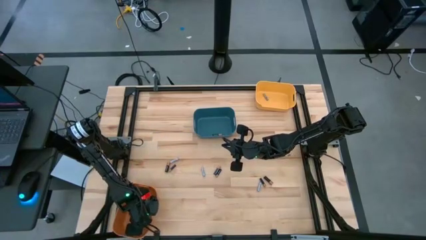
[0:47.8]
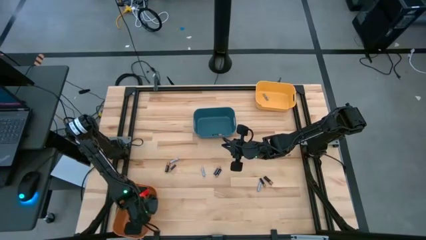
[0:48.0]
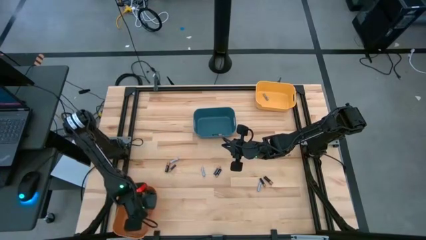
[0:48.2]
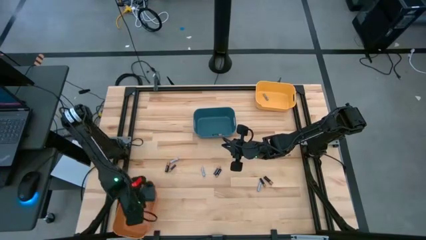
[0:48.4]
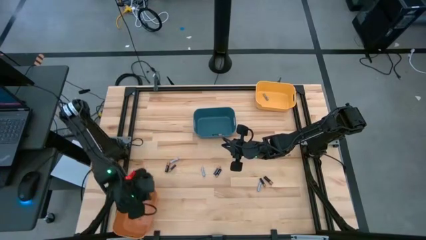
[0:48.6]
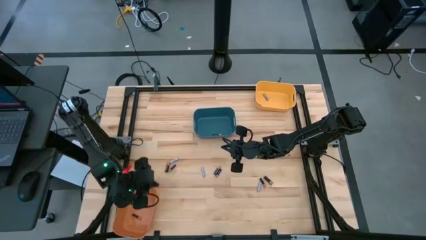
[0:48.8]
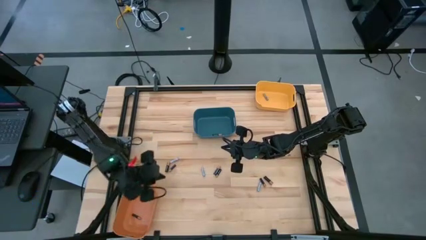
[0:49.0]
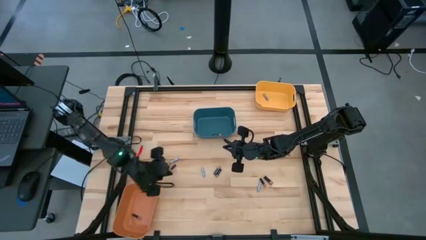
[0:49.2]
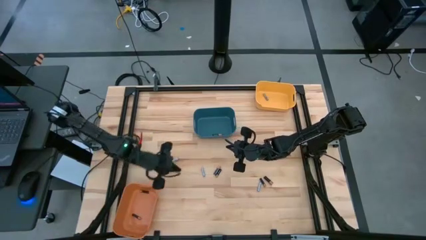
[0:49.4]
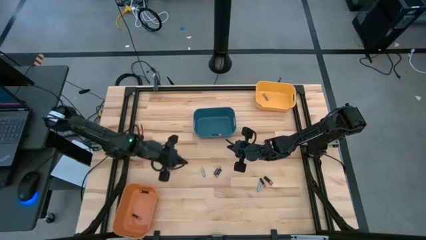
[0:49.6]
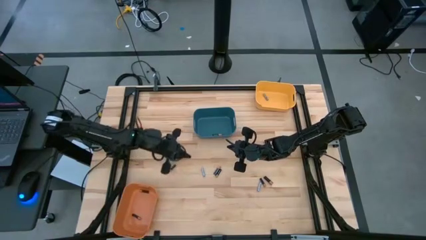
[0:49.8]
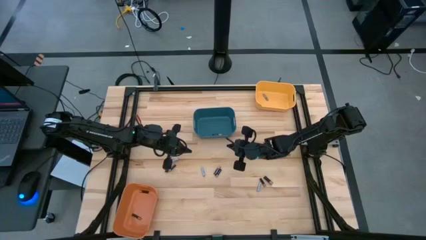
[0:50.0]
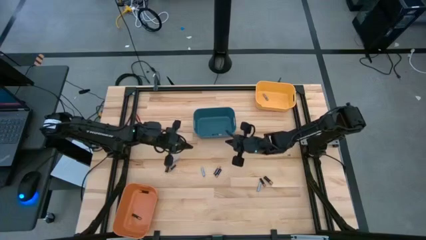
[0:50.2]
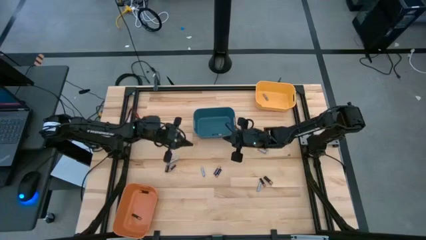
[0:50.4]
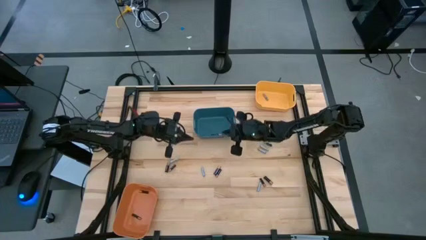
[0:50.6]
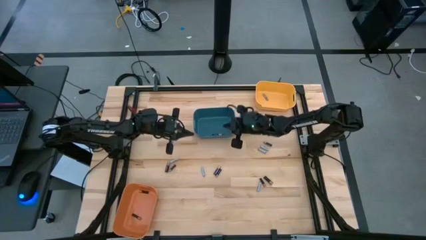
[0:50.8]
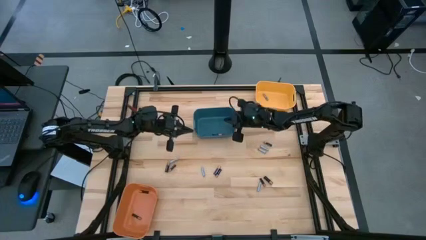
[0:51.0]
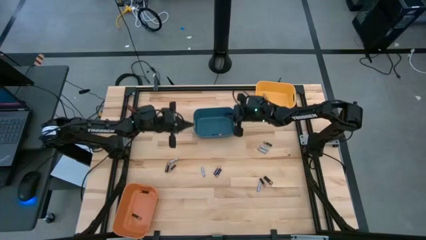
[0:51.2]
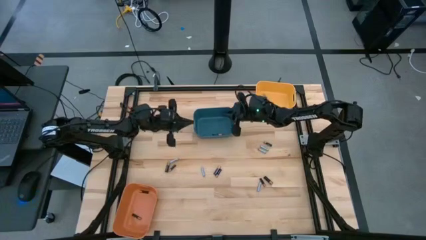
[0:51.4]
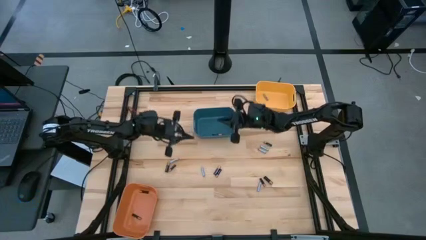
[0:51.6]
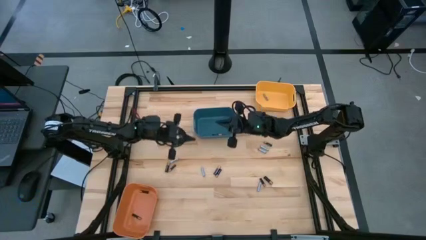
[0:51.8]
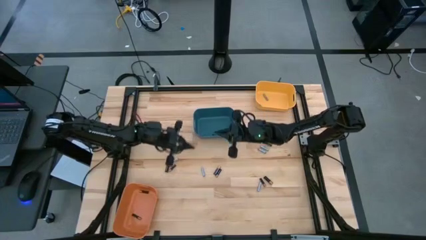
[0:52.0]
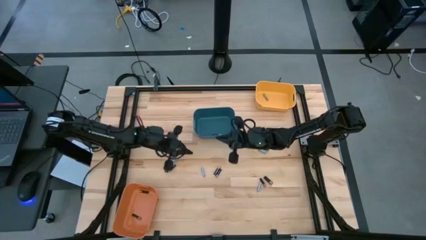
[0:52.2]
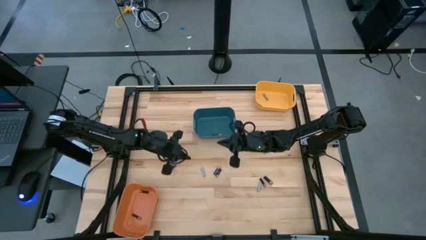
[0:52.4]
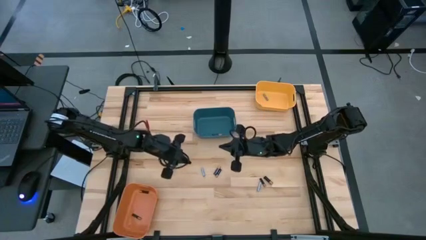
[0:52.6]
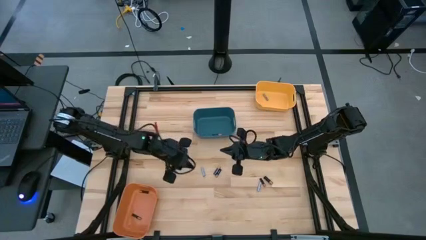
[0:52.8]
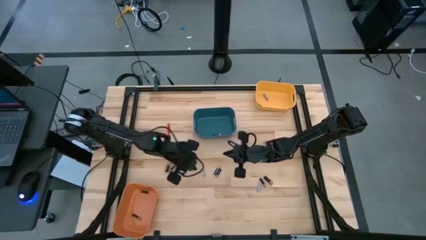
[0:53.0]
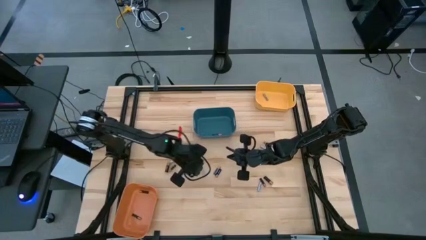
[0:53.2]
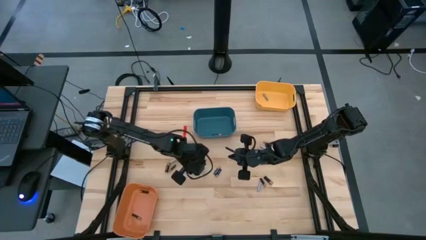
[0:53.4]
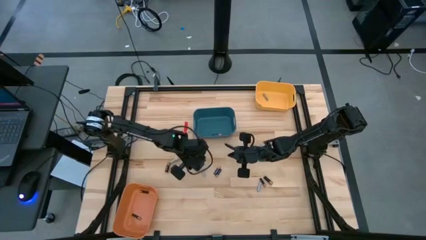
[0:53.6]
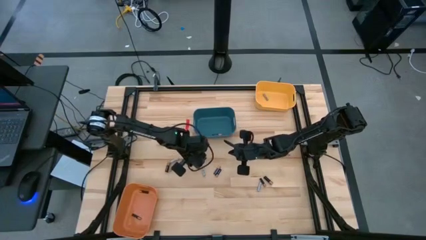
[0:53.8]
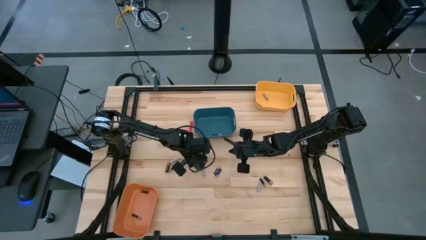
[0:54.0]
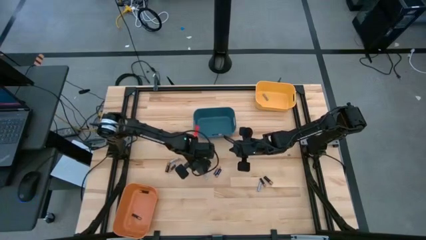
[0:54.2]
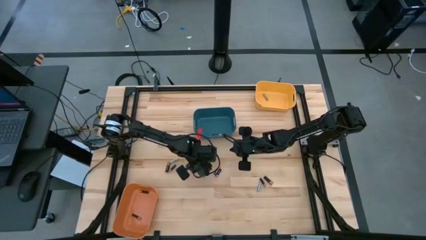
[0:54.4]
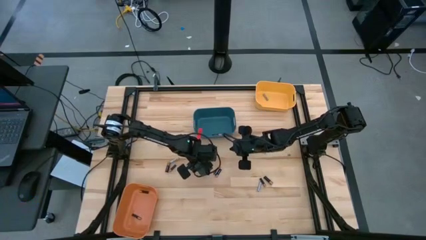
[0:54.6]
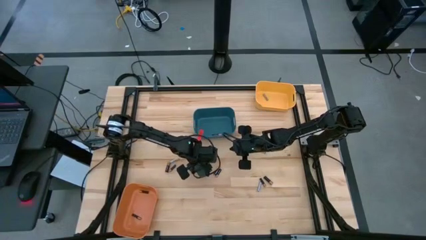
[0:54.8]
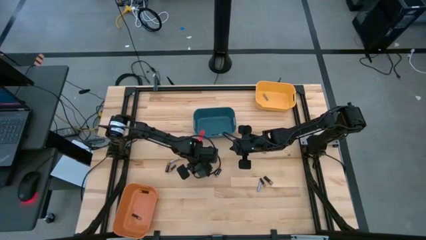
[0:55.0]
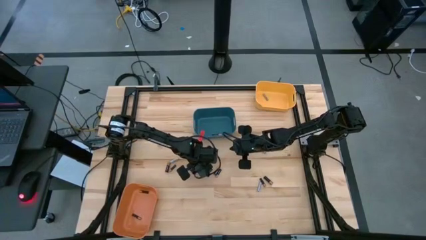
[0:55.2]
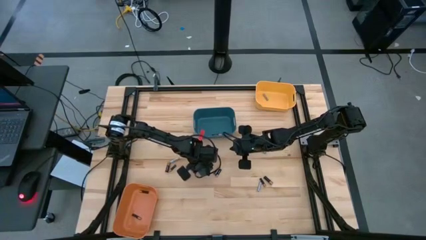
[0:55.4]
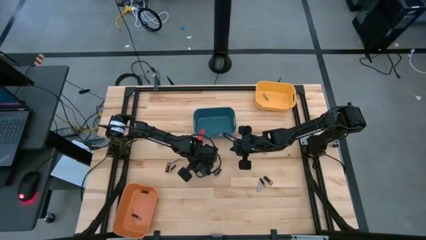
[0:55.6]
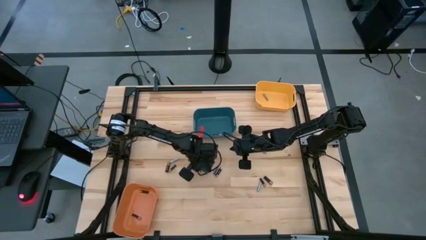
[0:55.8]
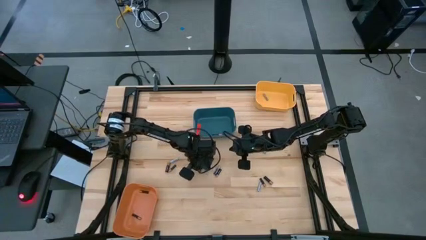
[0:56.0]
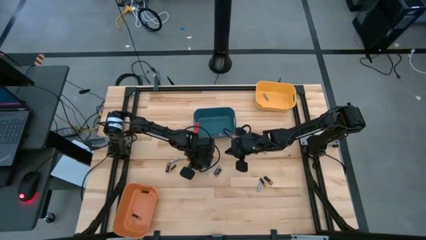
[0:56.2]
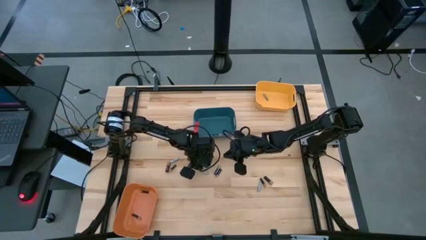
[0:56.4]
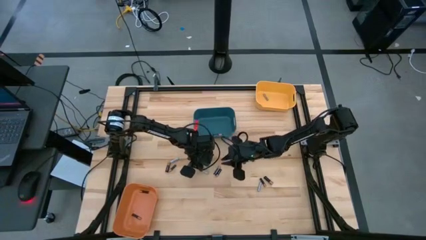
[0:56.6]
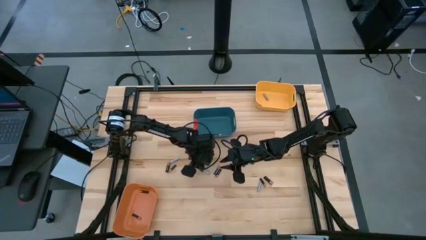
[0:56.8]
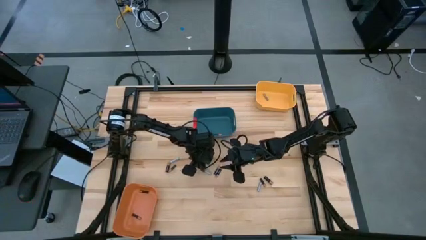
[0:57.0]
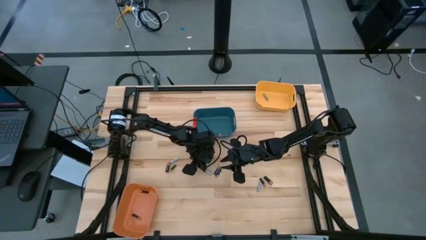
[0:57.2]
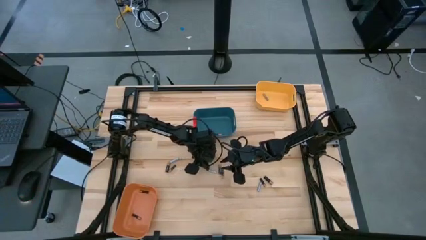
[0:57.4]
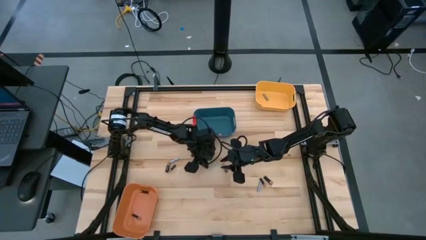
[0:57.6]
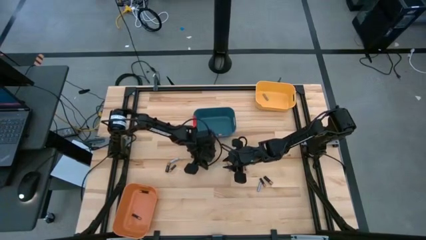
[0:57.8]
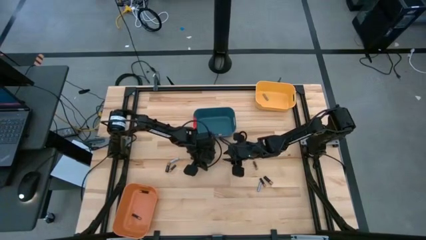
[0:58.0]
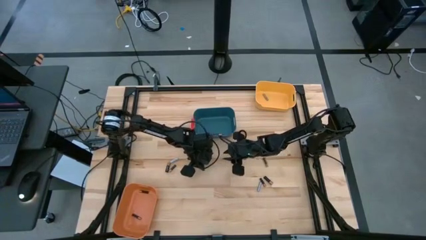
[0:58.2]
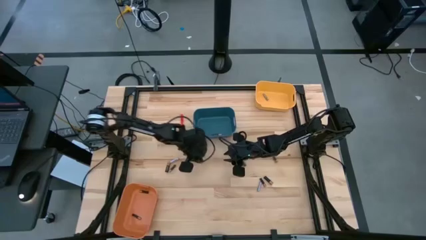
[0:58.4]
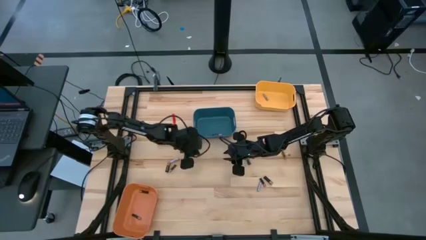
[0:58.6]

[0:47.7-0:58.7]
Task: Sort batteries
Put the white battery into the yellow bin

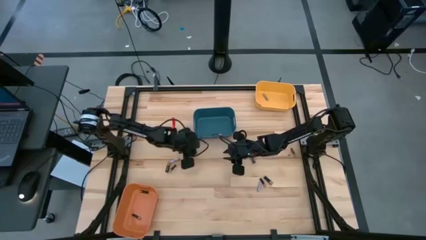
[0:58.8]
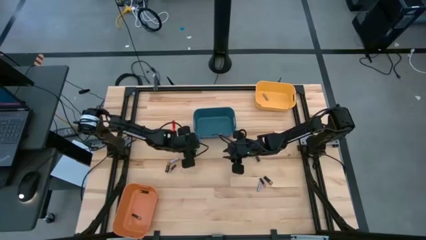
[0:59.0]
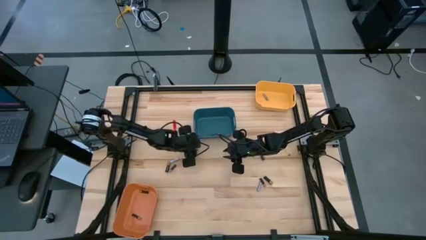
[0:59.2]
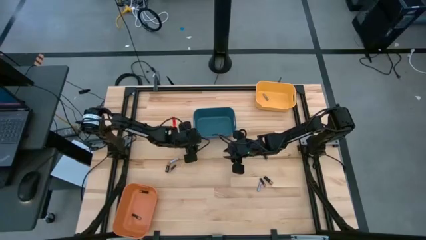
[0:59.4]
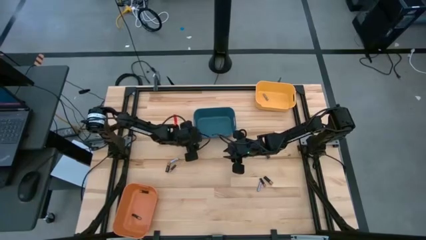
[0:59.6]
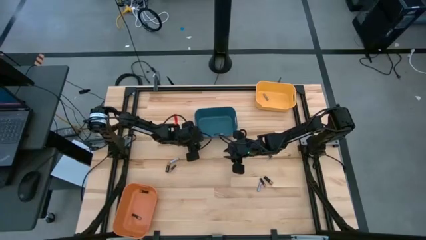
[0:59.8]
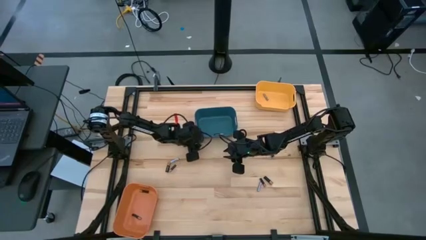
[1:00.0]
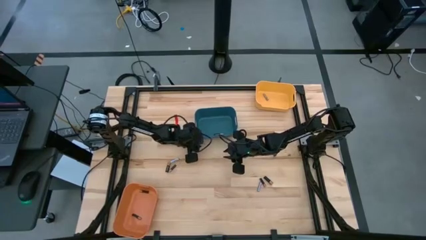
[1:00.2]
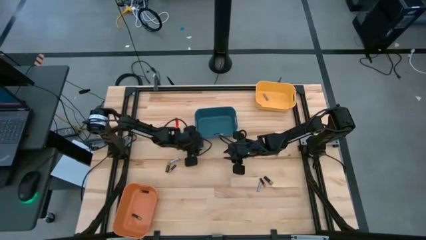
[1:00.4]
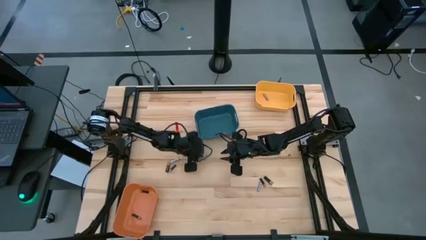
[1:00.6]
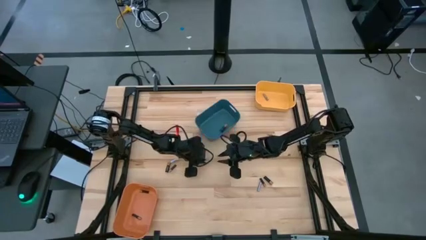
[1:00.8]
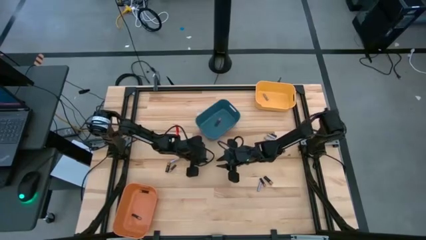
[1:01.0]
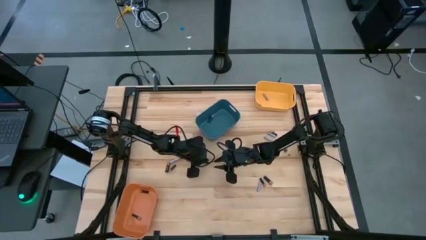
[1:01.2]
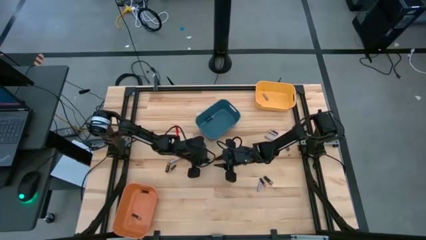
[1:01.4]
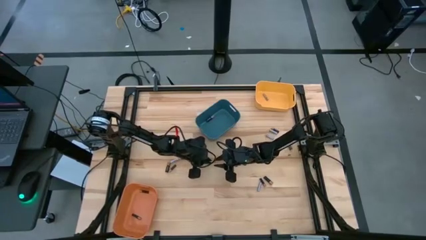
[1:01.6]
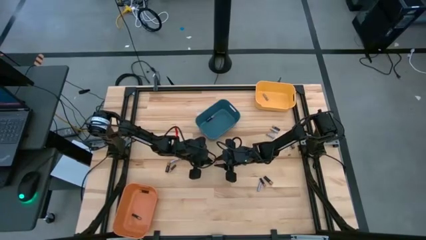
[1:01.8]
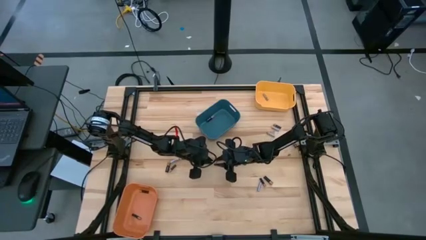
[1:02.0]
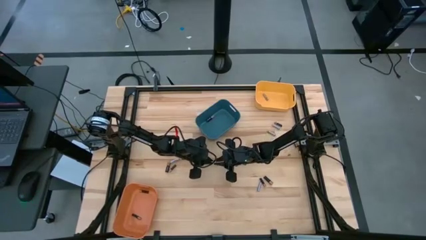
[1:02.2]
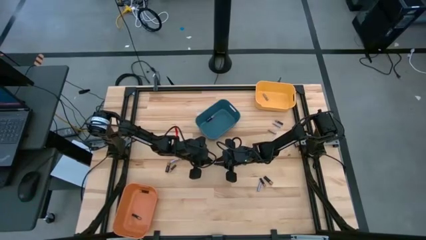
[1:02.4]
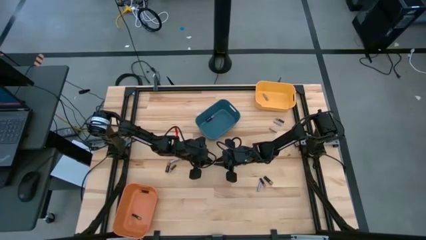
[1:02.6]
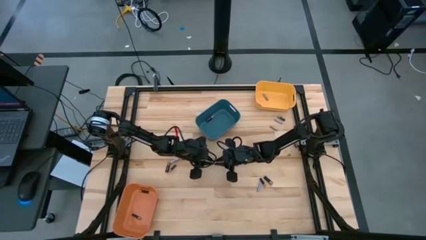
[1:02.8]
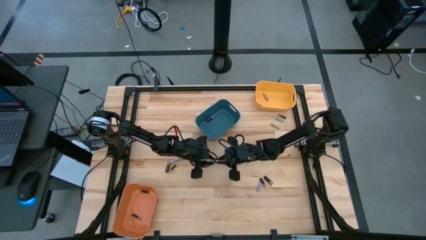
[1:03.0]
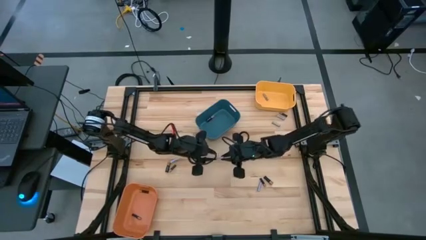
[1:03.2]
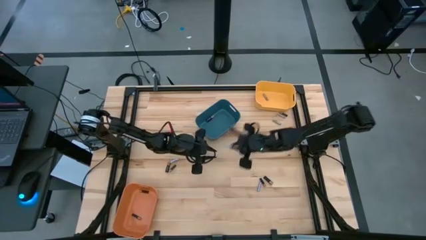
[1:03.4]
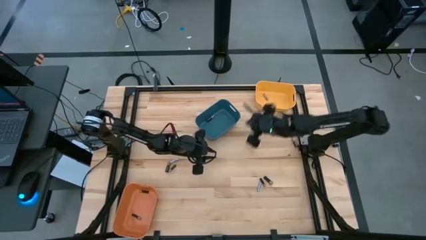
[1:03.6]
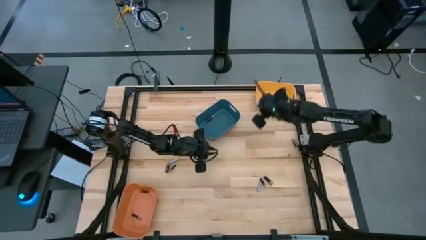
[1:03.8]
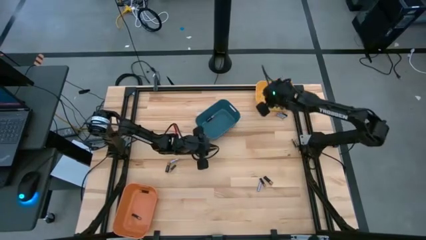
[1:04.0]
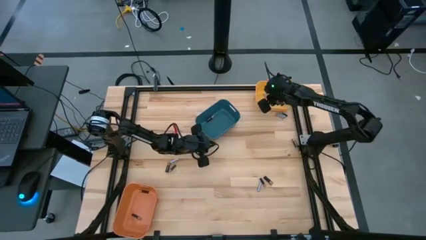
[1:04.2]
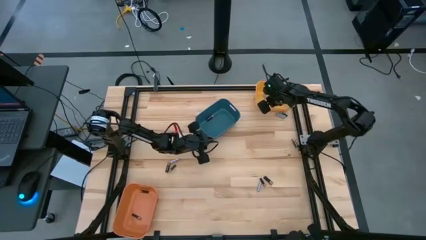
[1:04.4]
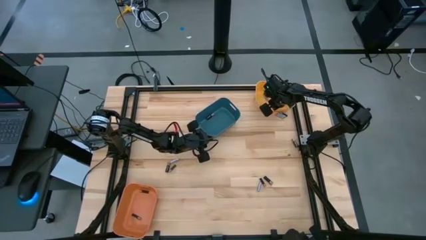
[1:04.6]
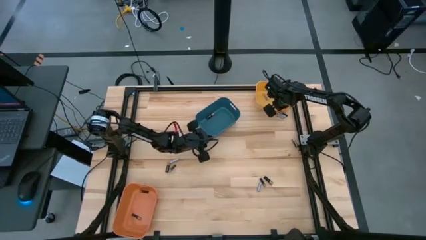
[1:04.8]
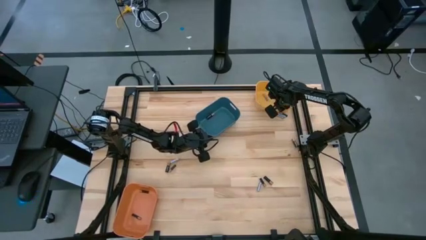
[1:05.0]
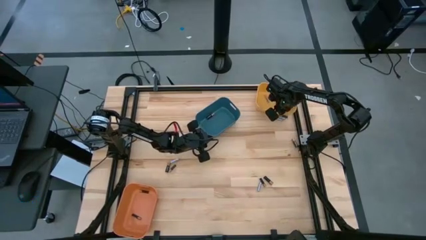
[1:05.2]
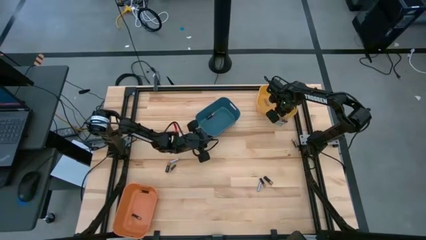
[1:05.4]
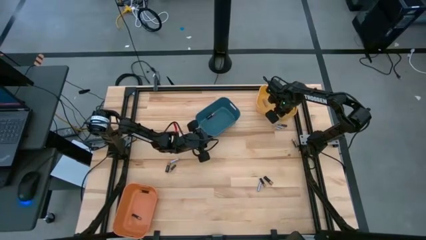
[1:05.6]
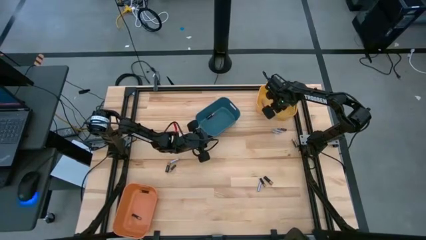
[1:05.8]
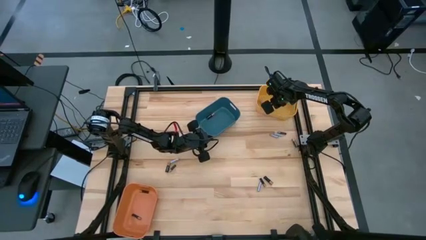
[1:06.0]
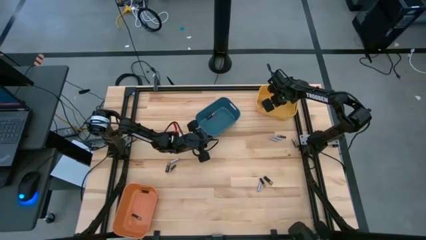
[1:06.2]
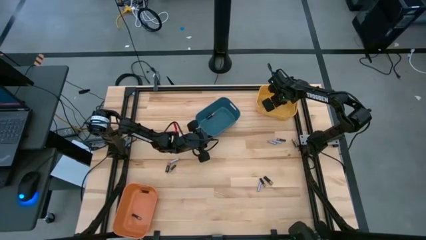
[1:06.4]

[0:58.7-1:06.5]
Put the white battery into the yellow bin
